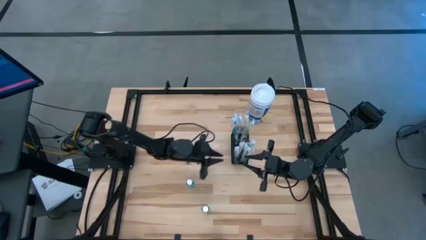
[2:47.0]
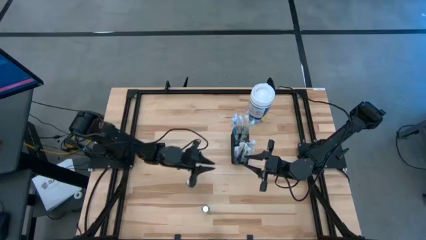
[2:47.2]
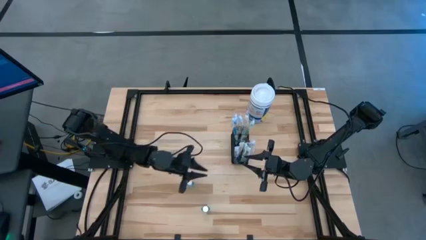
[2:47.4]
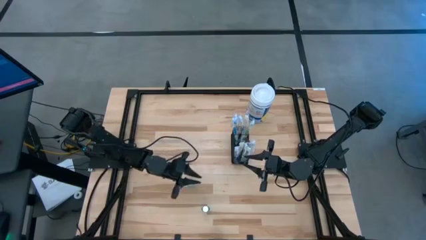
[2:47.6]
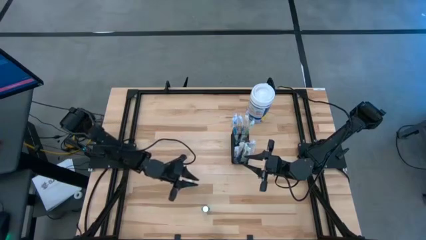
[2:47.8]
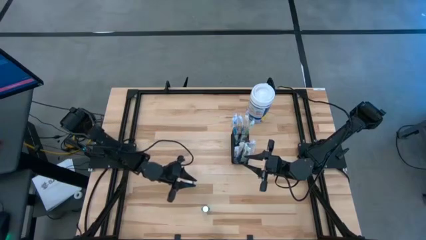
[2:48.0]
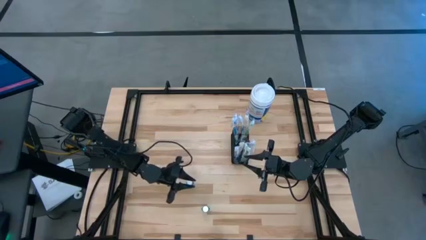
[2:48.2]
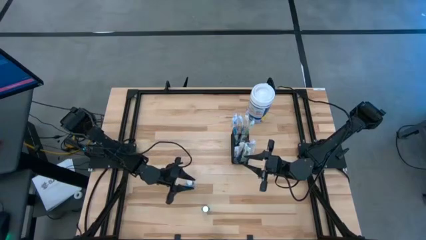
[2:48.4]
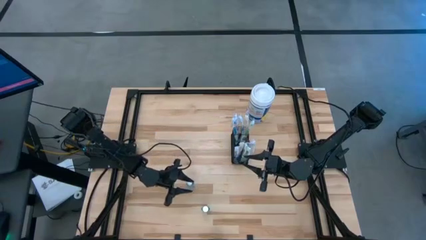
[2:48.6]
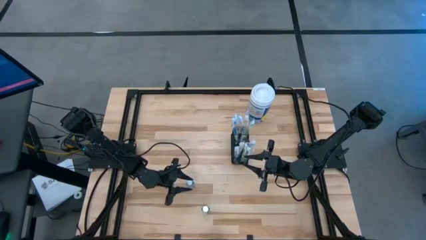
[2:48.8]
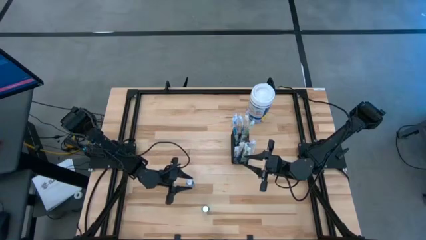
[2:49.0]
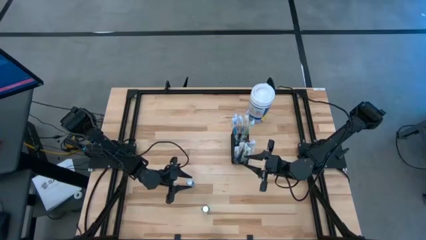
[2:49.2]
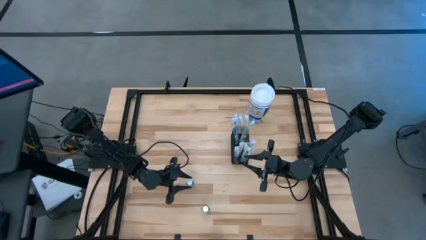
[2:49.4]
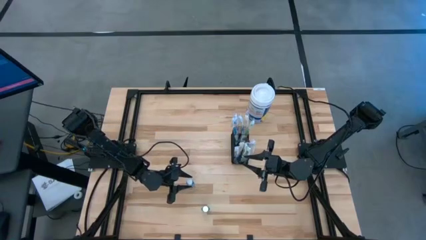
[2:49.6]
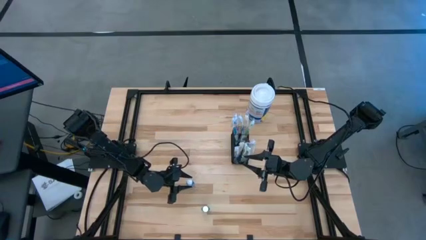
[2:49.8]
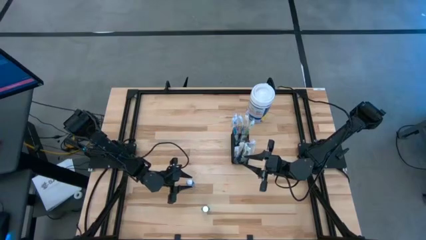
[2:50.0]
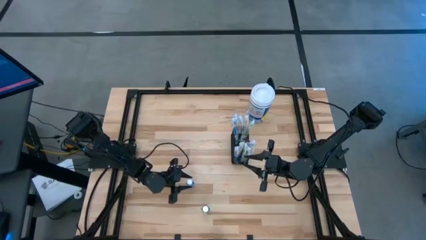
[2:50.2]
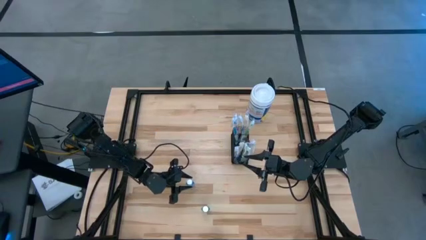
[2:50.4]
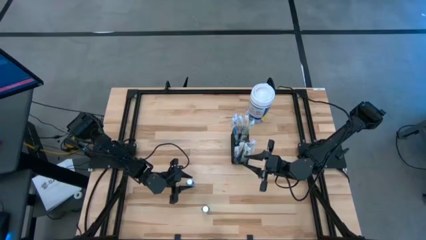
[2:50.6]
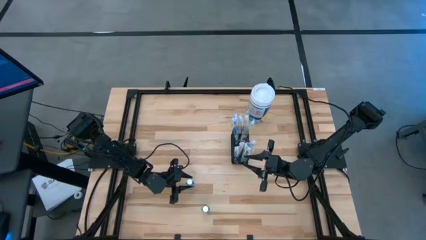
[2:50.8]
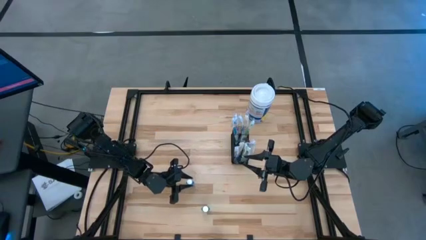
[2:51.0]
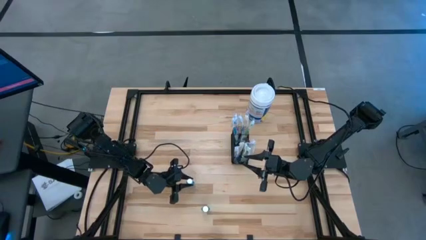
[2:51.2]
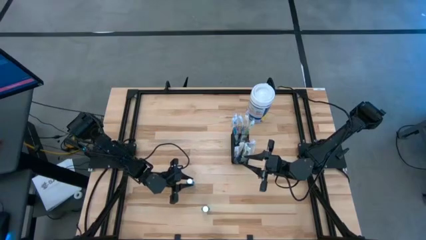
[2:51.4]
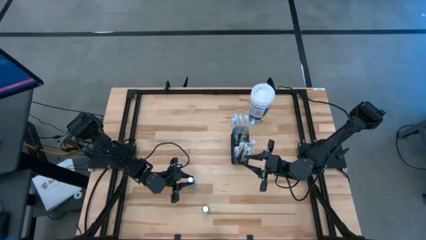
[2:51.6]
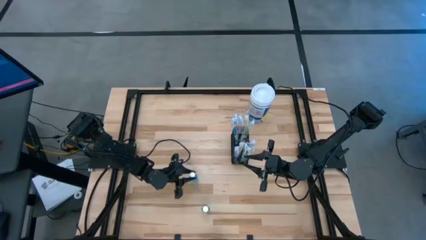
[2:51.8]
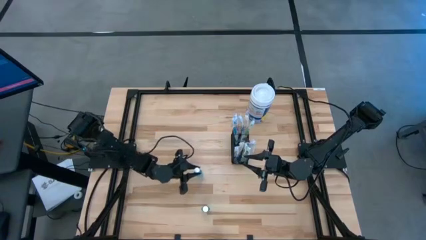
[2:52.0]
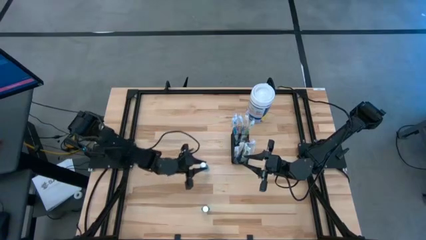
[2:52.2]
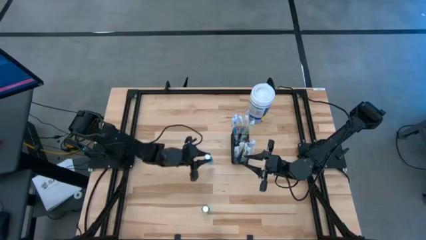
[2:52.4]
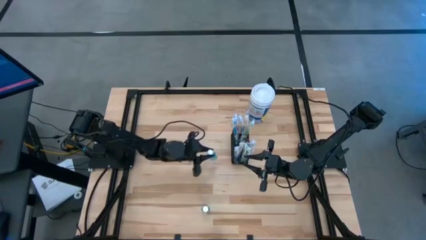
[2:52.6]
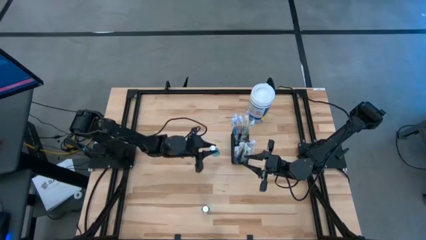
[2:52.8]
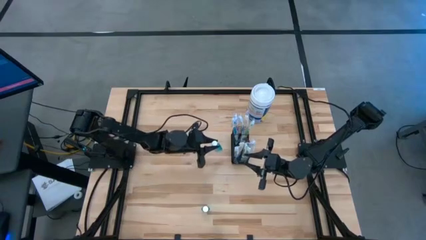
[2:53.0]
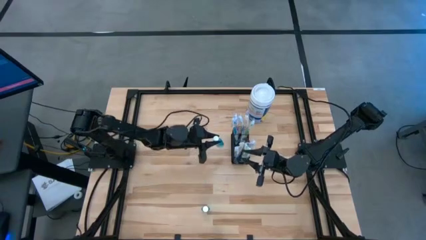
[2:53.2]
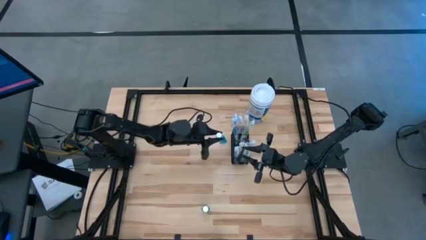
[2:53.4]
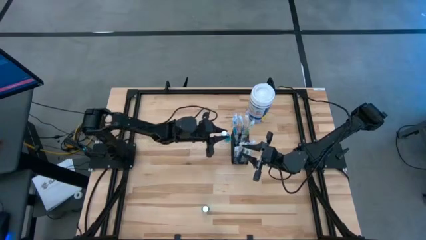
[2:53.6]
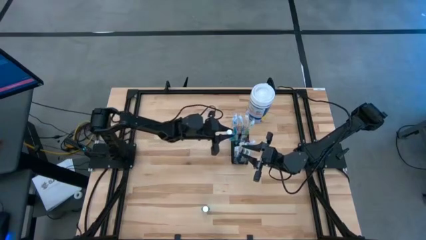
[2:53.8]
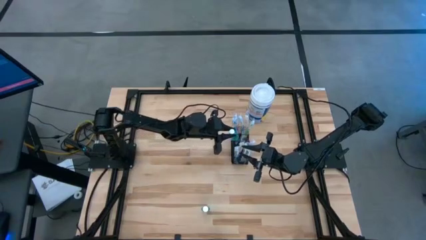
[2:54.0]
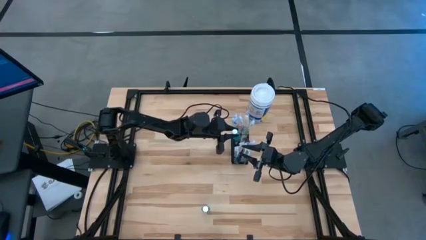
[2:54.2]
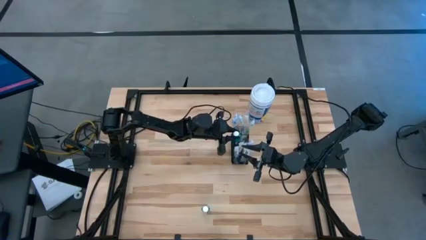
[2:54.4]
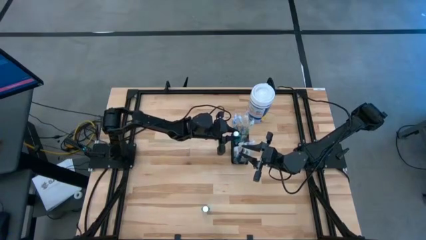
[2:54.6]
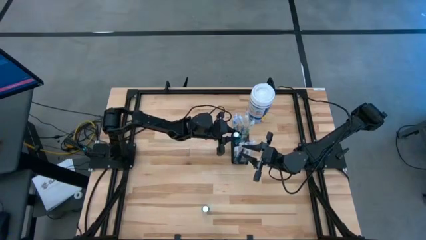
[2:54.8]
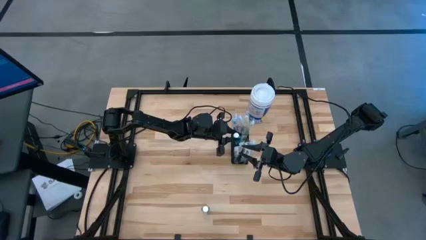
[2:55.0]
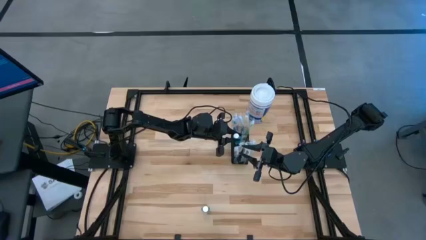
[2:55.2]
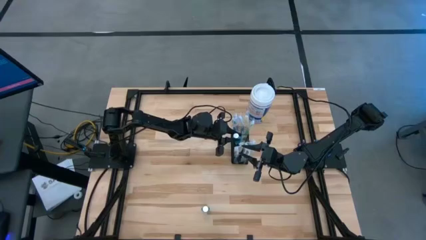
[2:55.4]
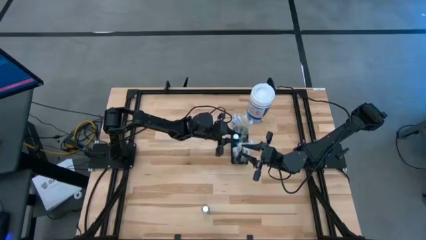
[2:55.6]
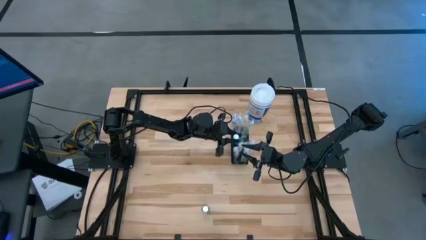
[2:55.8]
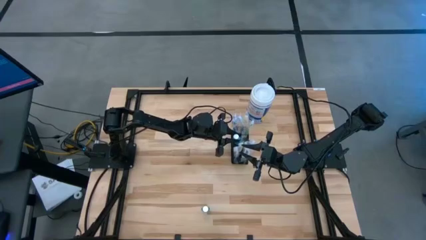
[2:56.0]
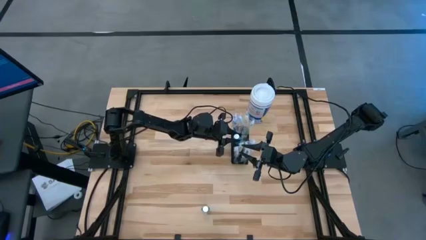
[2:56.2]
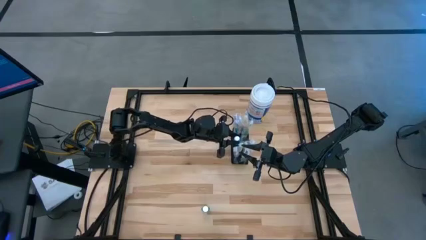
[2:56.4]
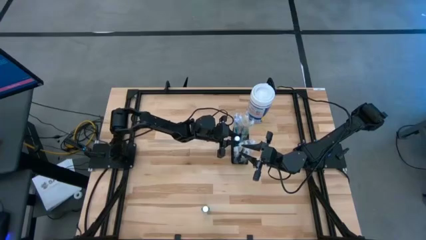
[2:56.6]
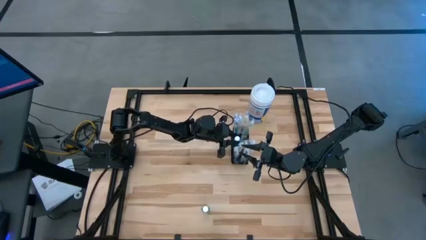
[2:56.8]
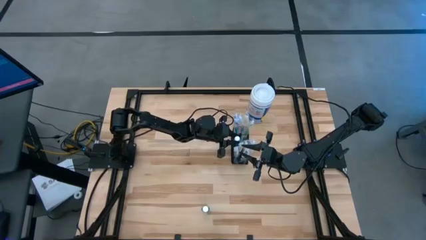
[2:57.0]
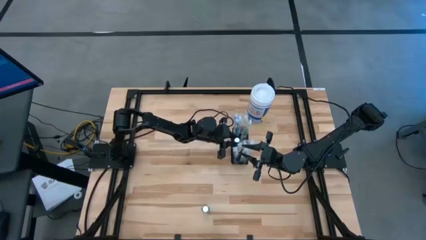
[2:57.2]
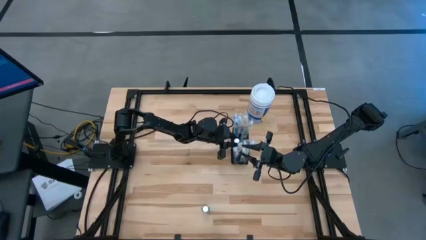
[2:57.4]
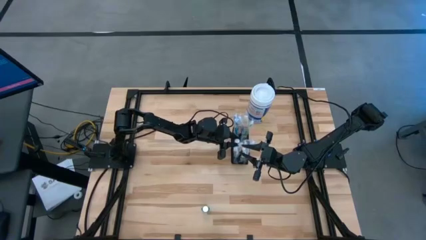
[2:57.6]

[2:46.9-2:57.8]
Task: Pick & Place toothbrushing station
Put the top blue liquid mouthwash into the wire mesh organizer

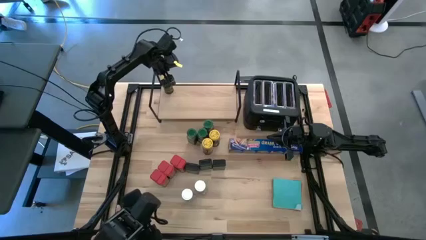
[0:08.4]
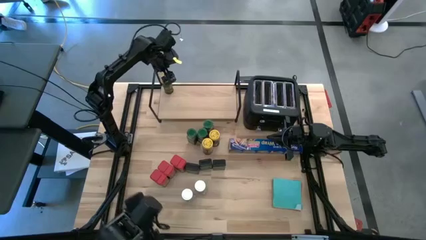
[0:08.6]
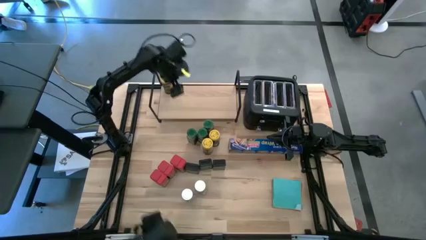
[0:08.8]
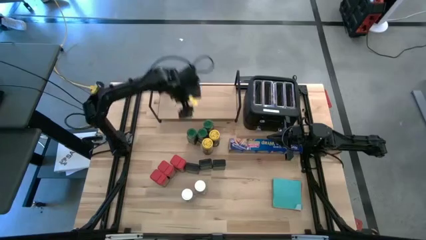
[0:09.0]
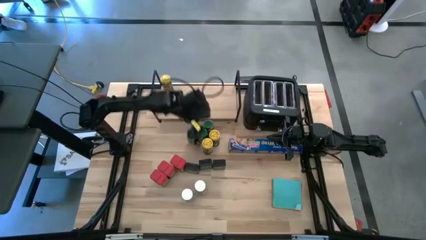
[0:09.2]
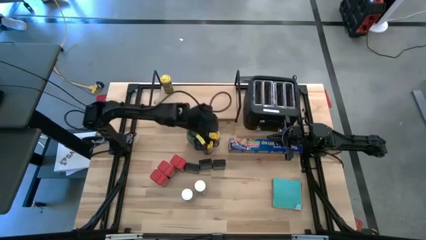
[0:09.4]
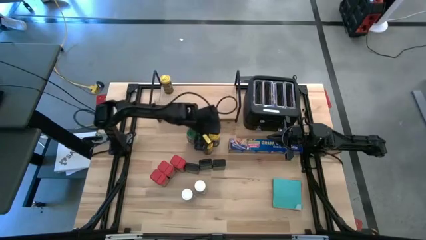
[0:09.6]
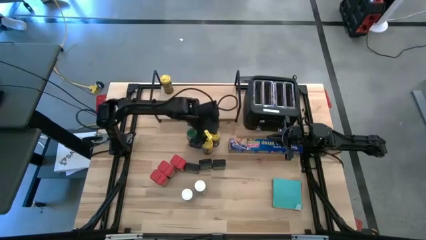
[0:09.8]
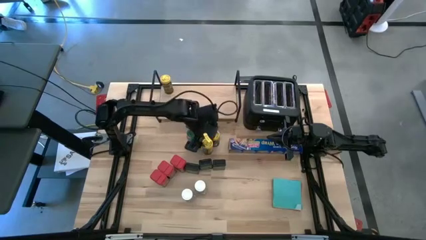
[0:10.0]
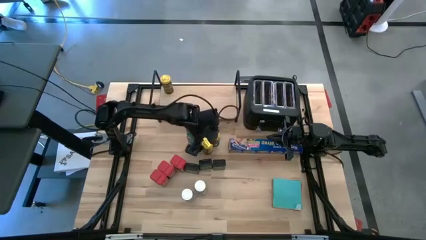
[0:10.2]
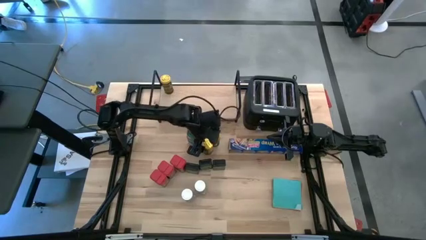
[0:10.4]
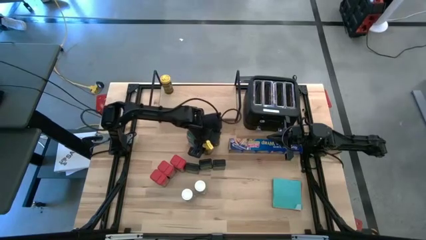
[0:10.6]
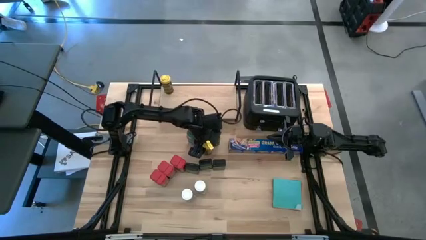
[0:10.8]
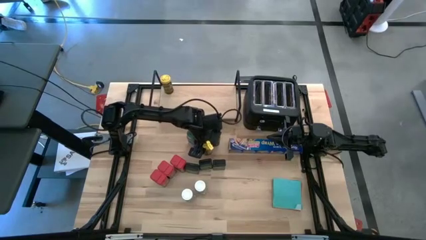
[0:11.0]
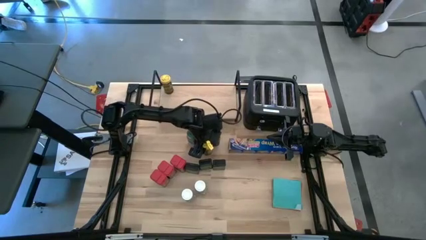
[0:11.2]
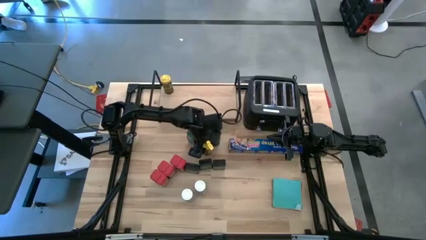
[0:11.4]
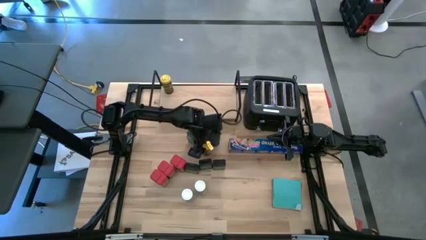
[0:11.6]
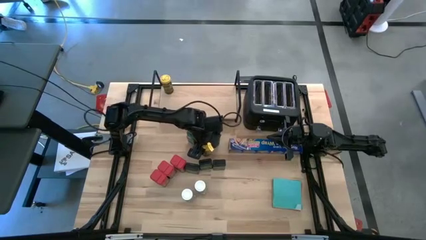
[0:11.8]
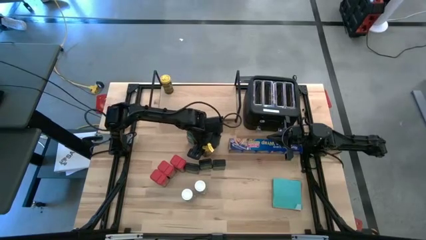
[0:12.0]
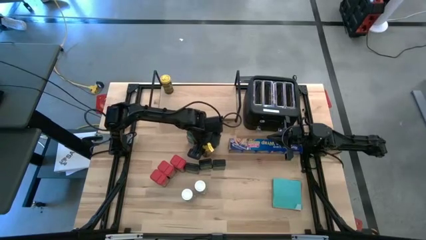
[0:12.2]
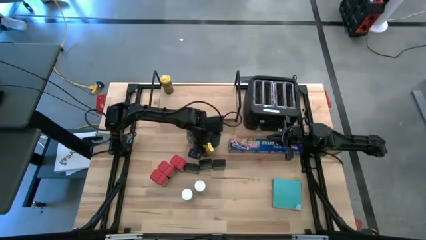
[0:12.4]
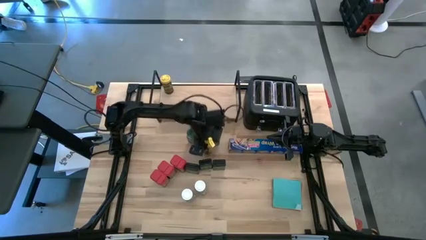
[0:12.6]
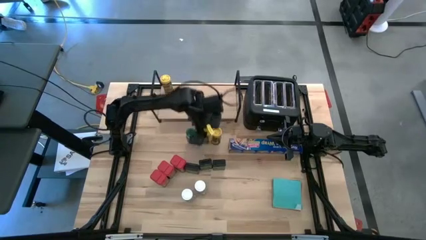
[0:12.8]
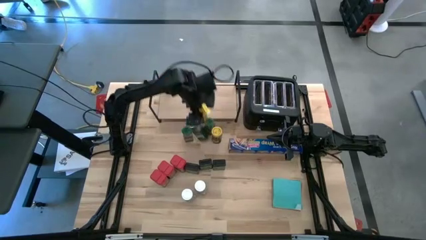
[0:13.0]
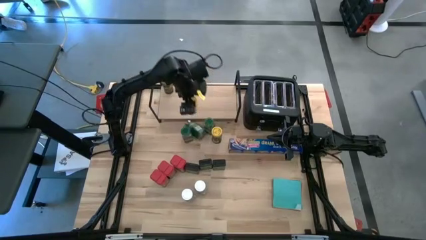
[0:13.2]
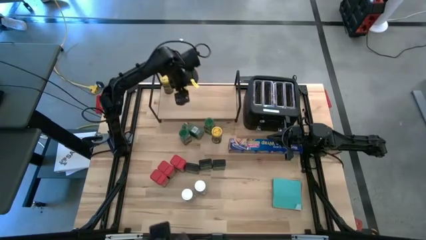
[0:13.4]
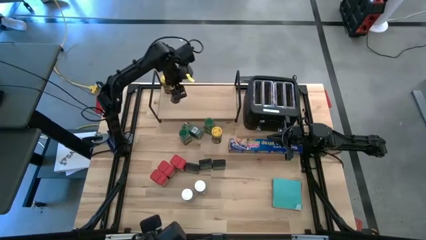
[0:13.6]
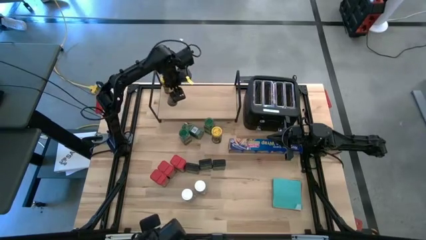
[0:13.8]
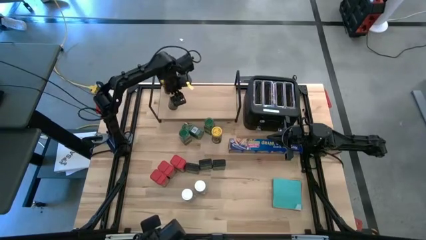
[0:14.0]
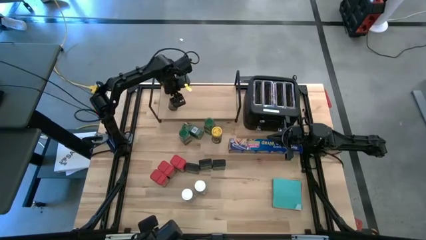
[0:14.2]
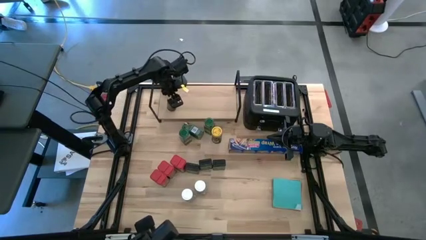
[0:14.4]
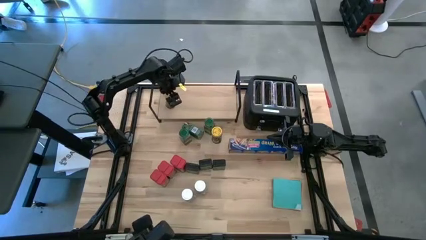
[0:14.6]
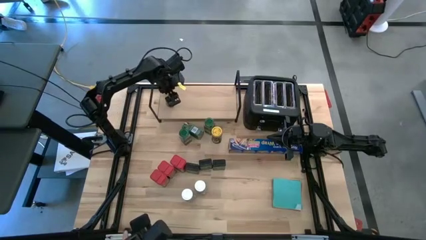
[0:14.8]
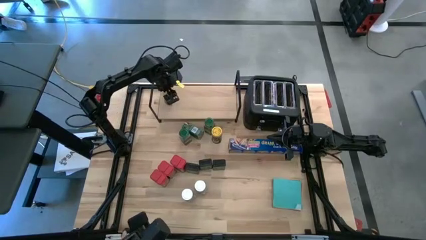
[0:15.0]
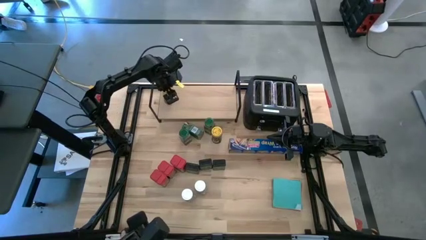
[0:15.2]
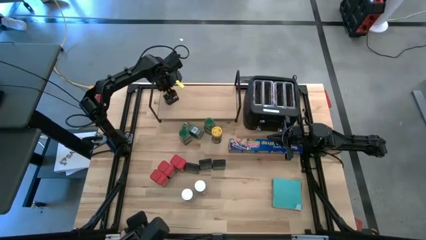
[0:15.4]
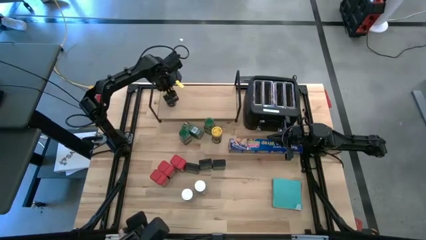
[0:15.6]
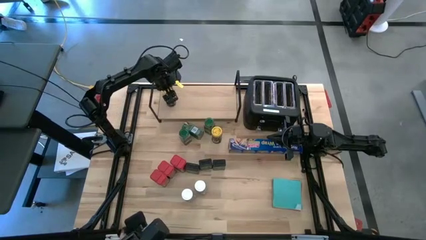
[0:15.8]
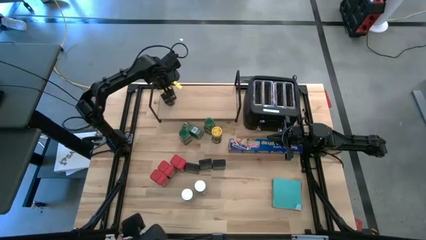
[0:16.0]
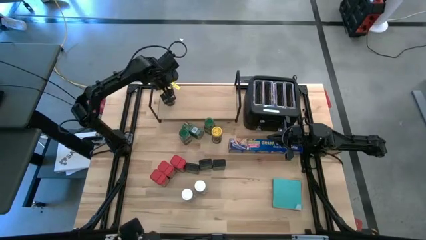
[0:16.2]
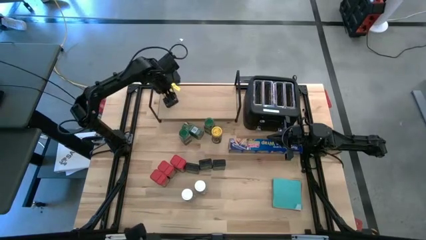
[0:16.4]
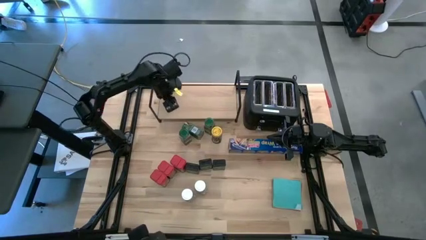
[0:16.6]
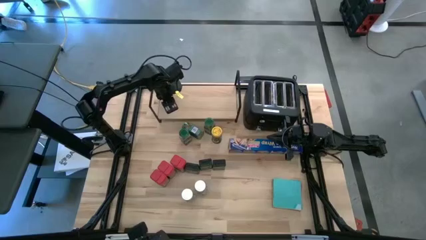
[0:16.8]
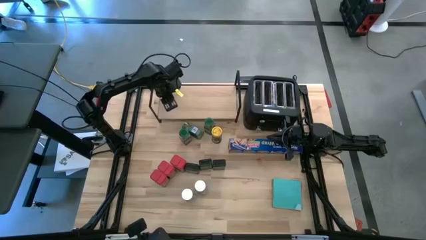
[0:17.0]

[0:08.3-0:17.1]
Task: Shelf spices
Put the bottom yellow seasoning bottle on the shelf aligned with the other yellow seasoning bottle
